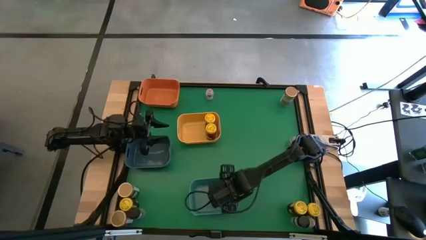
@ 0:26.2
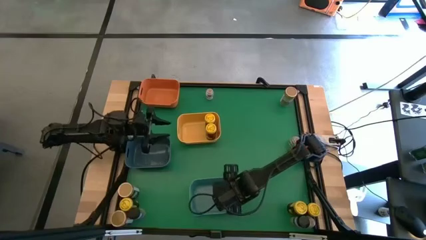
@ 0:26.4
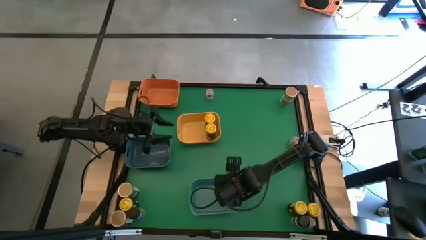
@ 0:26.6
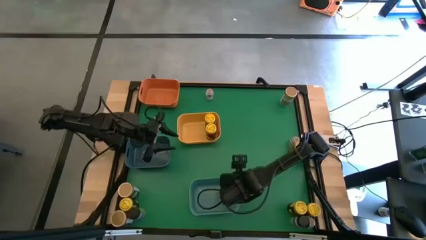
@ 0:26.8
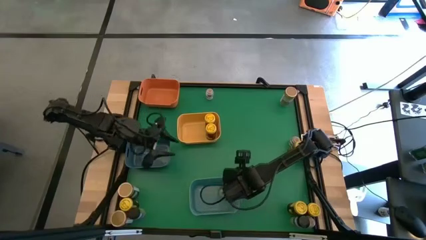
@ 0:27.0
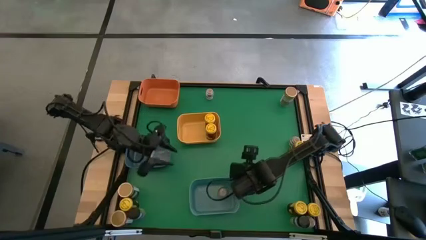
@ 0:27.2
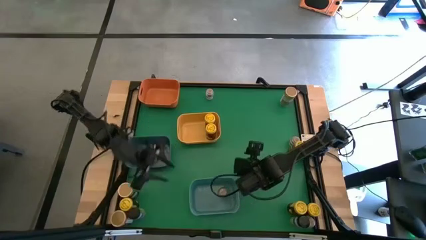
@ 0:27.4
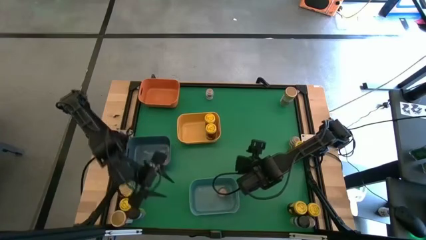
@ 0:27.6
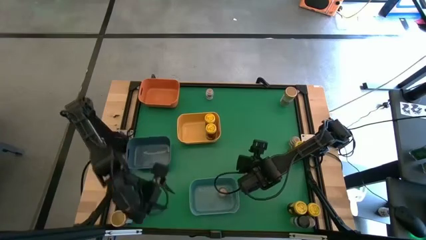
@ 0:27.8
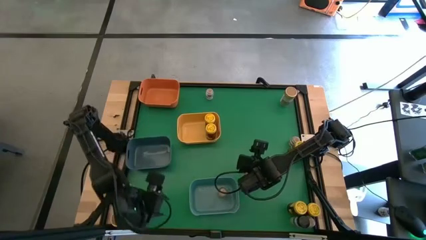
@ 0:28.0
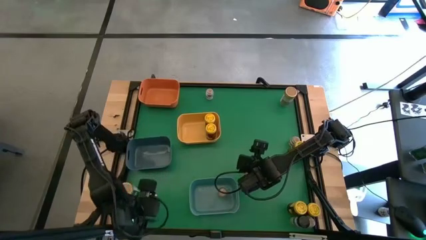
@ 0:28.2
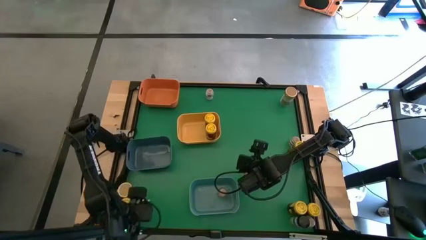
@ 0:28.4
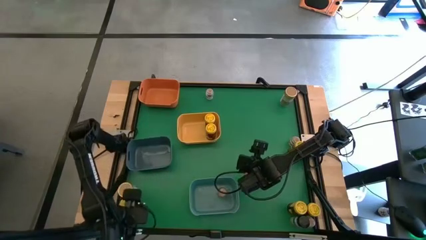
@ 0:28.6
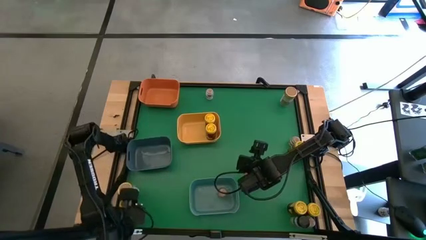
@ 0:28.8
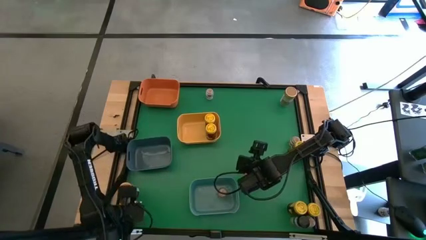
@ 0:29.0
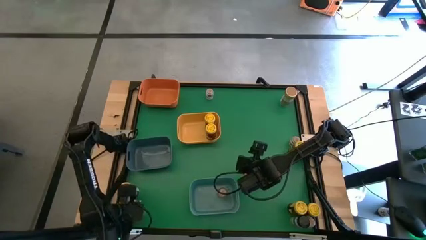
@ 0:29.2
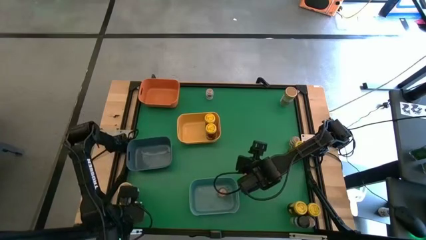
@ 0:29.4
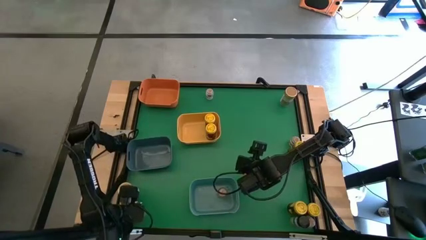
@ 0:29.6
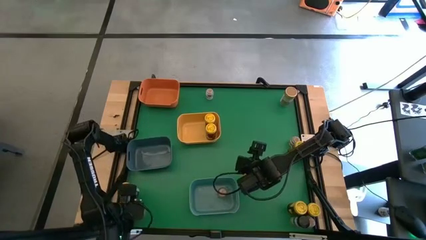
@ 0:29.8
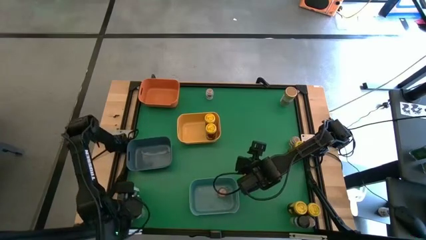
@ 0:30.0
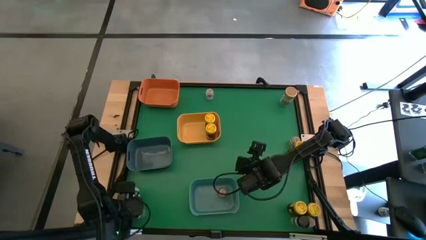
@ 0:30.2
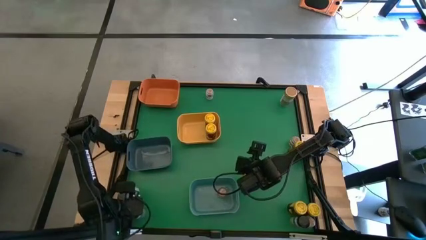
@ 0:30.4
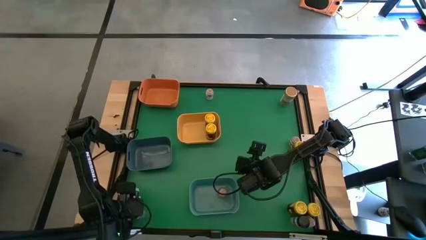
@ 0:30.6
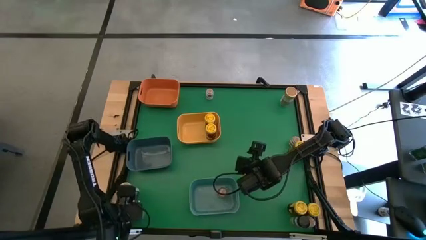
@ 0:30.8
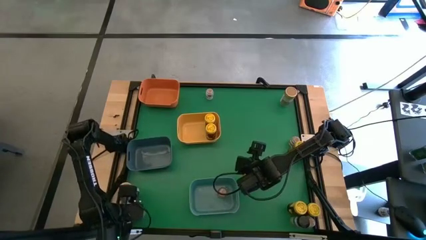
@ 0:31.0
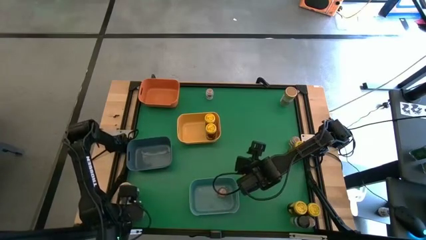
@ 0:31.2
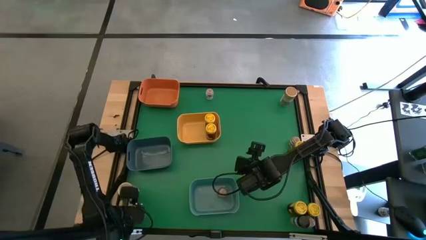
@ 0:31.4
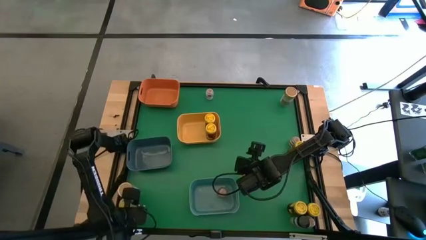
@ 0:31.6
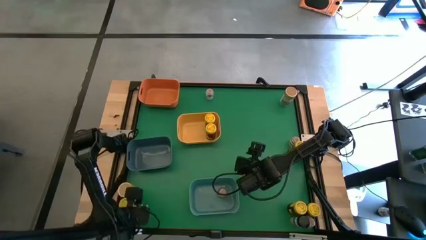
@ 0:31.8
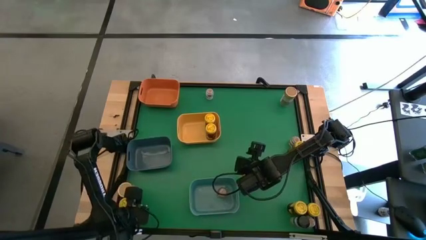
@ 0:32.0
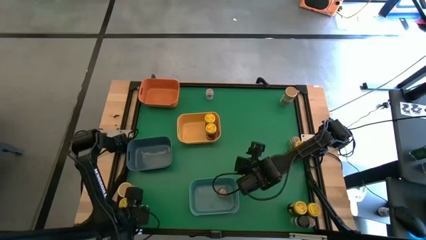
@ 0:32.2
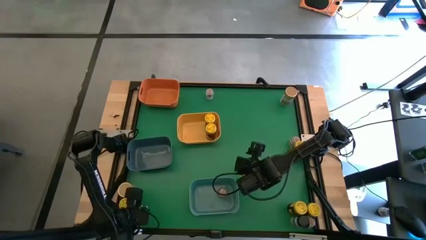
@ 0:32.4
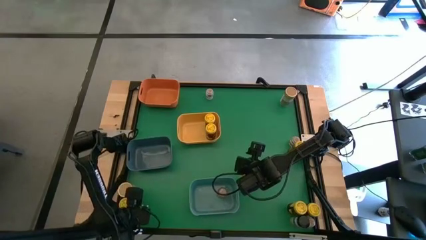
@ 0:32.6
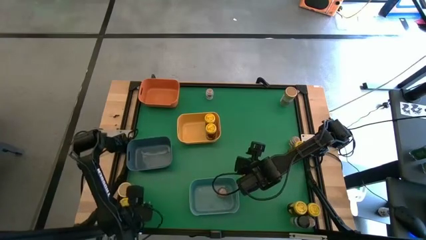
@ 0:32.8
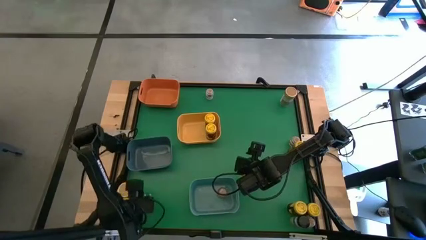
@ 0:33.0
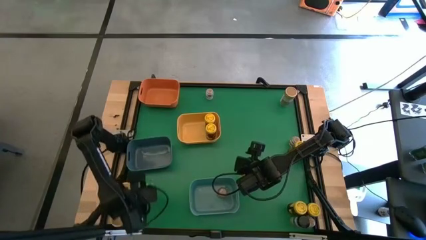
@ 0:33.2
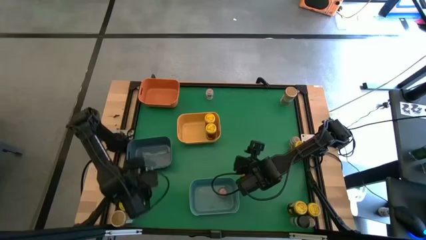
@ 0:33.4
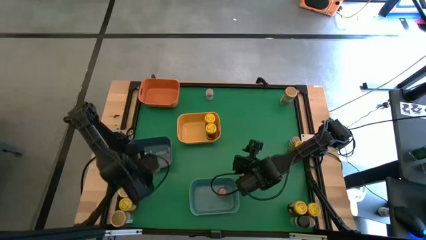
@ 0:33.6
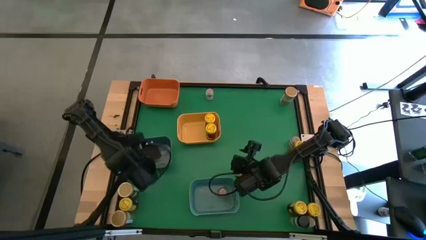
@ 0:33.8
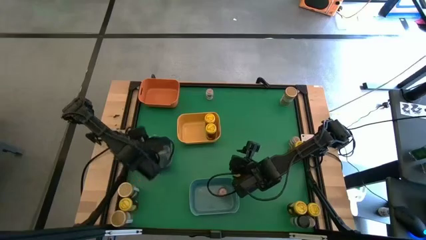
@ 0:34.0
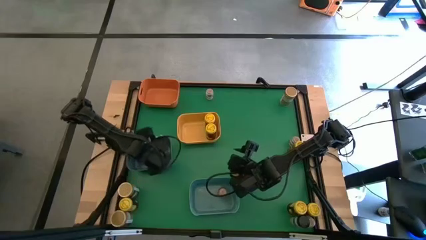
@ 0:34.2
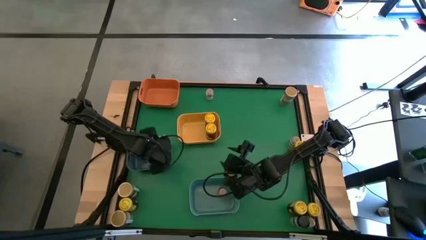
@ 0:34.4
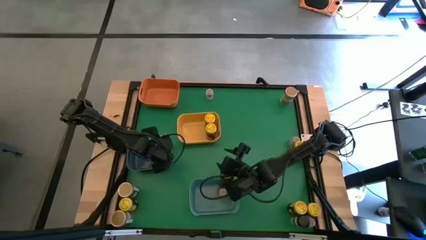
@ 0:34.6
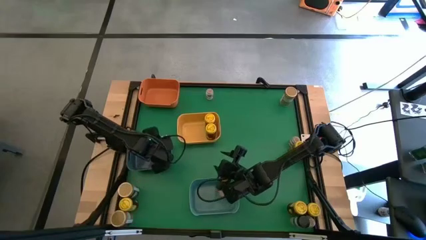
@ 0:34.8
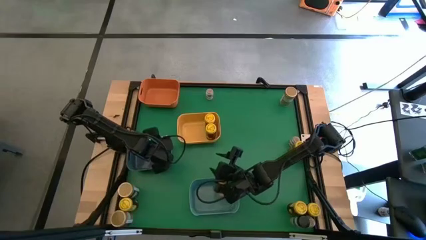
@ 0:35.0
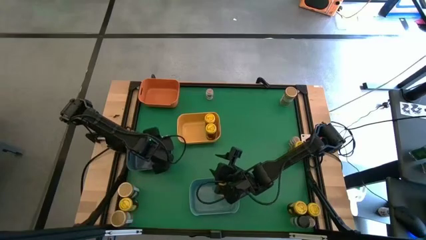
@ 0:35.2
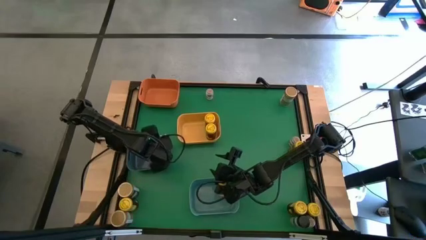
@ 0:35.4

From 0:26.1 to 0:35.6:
Task: Sort spices by type
Put the black seasoning bottle into the blue bin

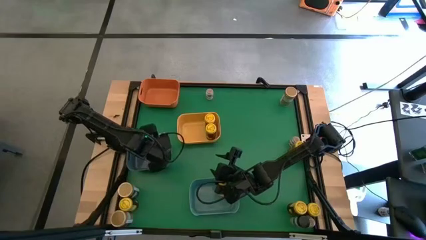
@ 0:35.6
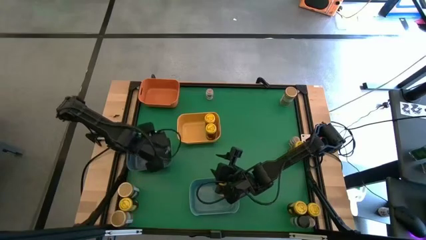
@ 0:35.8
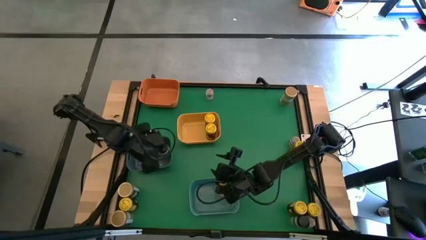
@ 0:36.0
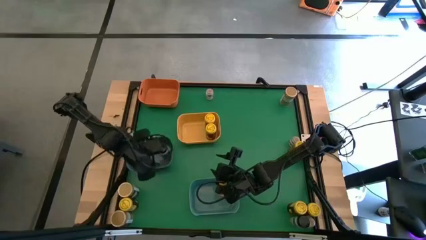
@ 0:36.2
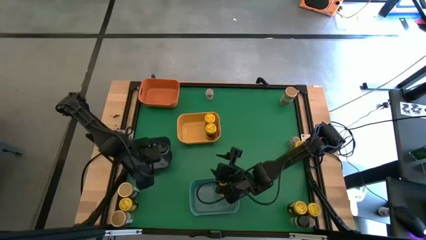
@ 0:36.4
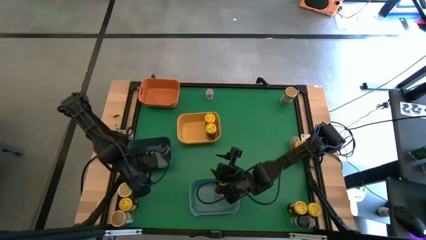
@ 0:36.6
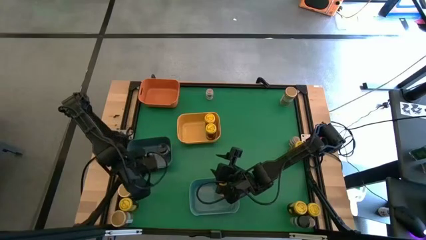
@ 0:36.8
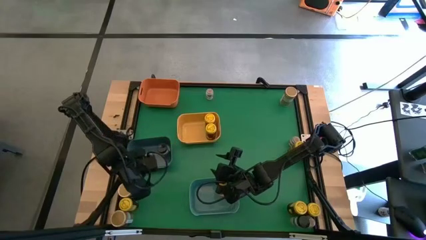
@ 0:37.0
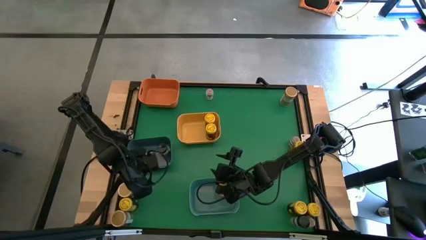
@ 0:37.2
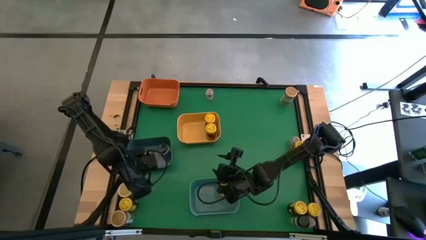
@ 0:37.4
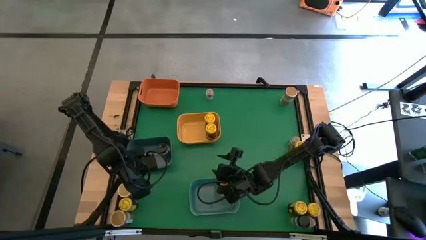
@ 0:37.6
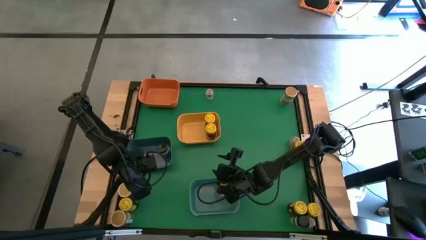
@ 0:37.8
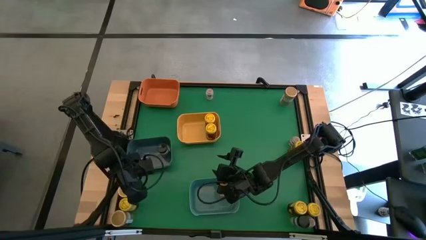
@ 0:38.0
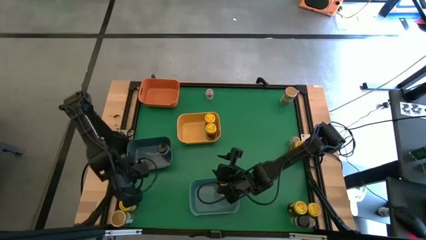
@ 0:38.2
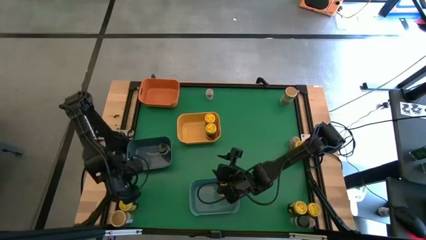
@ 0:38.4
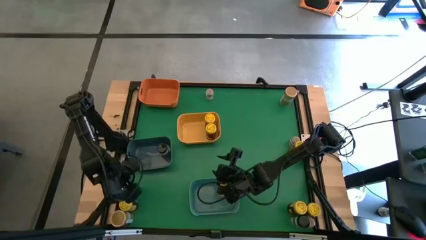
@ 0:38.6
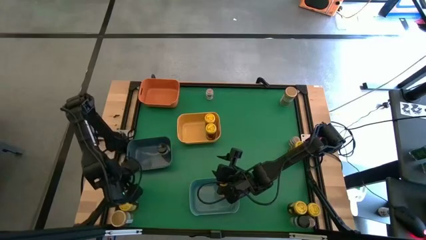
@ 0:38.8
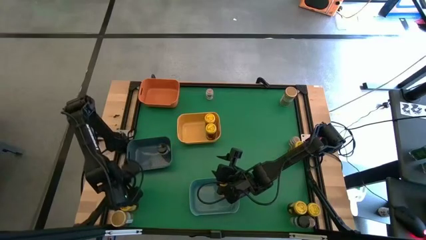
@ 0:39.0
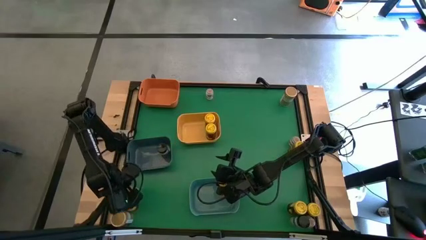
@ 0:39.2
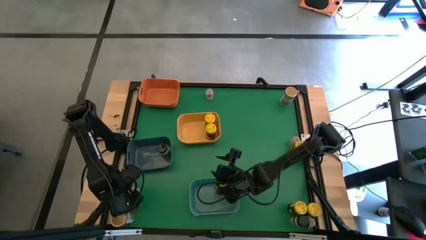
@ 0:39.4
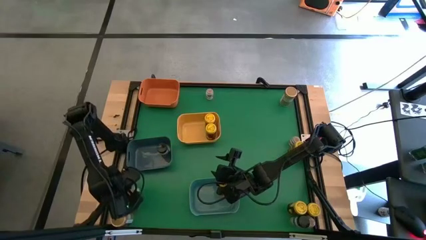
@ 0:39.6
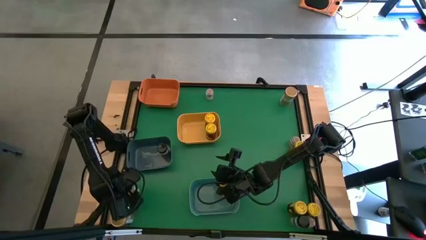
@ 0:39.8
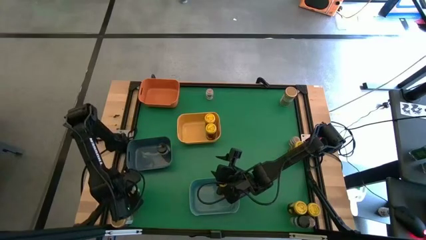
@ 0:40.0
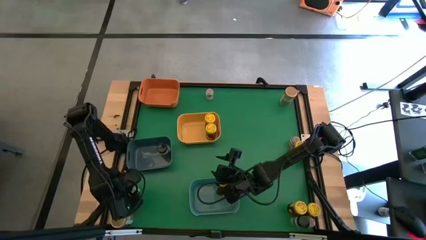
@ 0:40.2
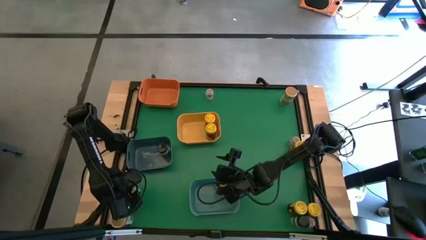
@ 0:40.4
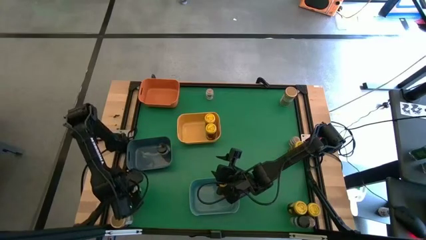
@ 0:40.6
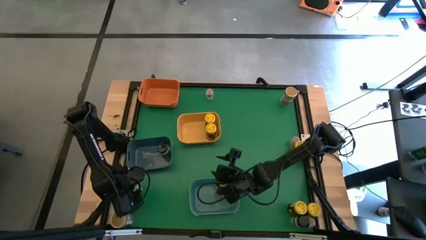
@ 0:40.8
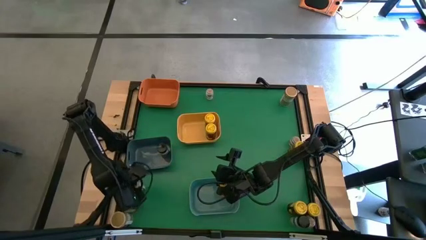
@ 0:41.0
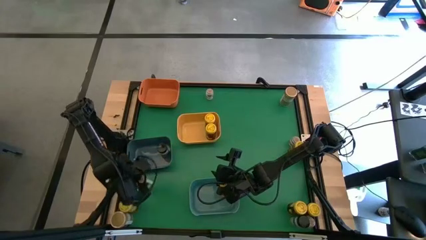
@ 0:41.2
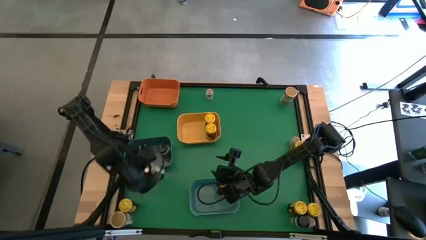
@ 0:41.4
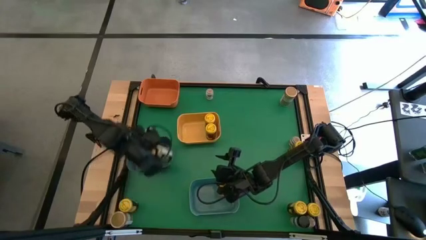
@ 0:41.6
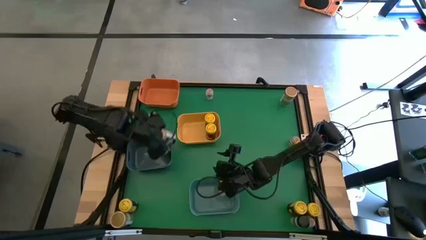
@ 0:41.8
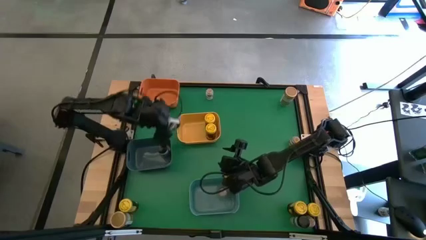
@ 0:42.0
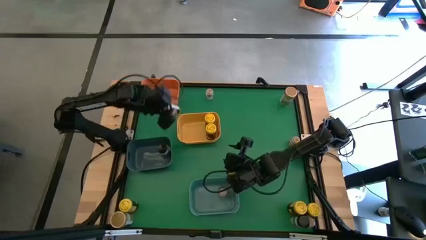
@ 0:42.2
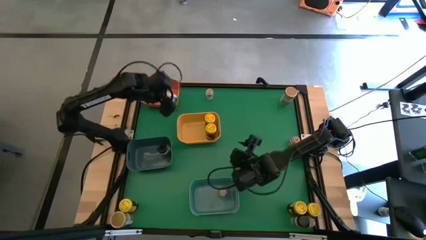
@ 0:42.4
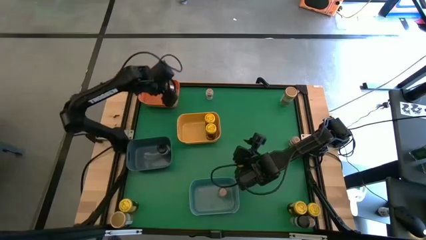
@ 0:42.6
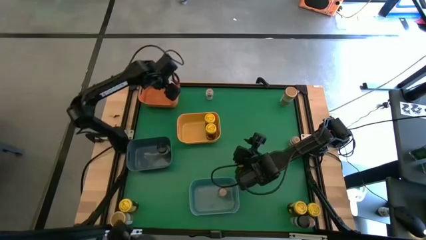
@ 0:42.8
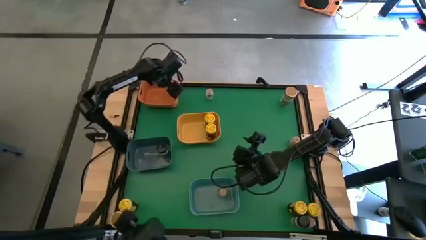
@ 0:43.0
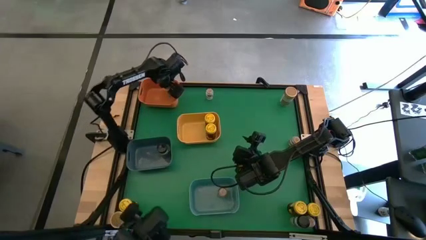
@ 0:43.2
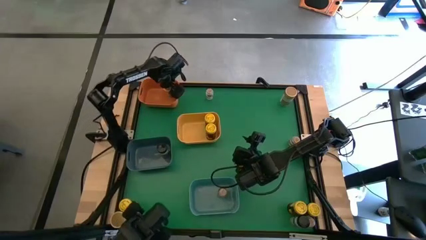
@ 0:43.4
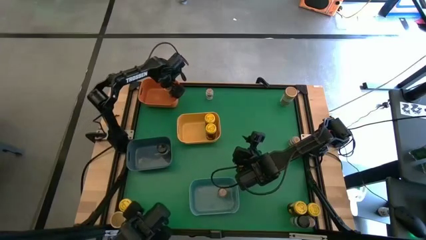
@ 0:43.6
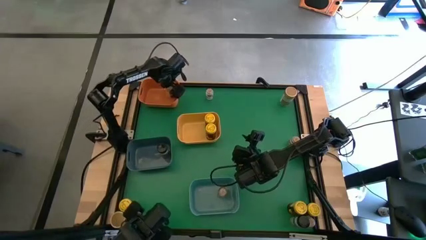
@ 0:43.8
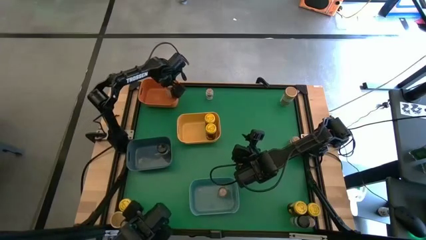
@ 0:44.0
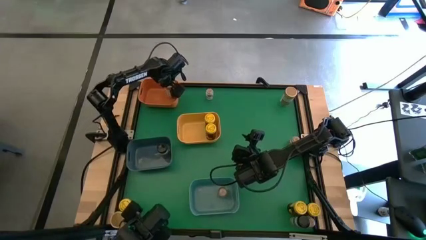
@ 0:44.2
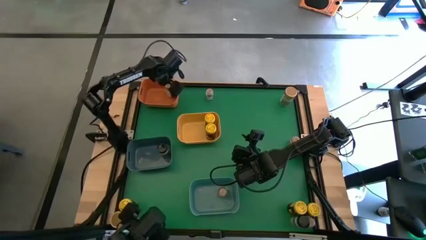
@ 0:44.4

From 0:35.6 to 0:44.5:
Put the brown seasoning bottle into the orange bin
